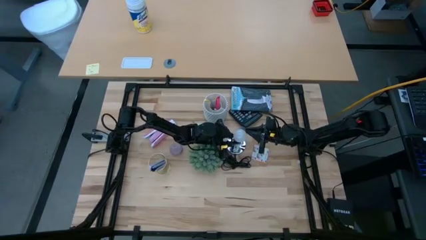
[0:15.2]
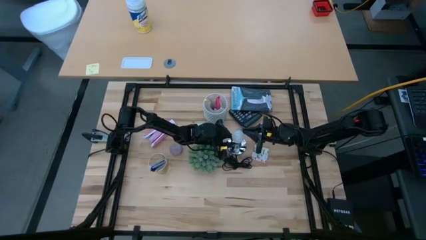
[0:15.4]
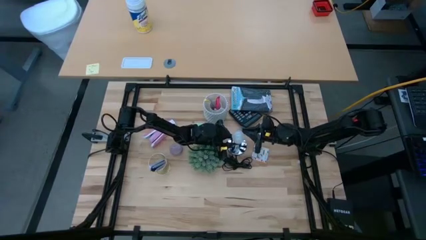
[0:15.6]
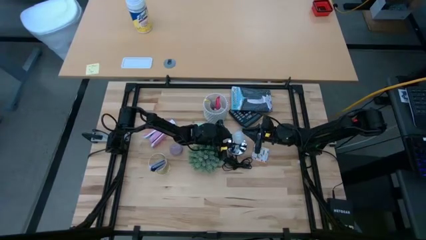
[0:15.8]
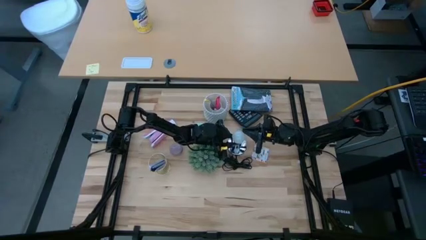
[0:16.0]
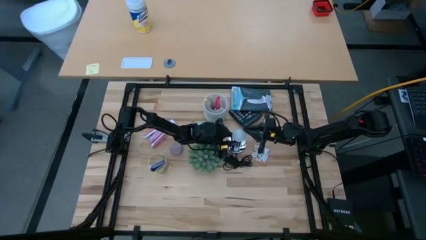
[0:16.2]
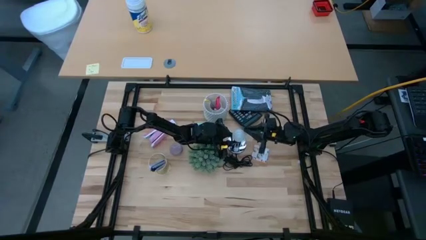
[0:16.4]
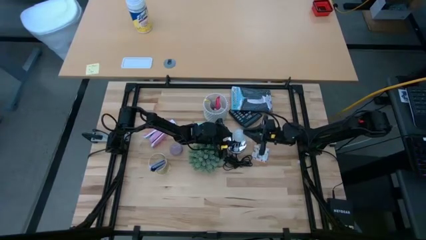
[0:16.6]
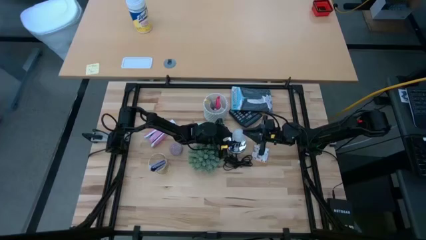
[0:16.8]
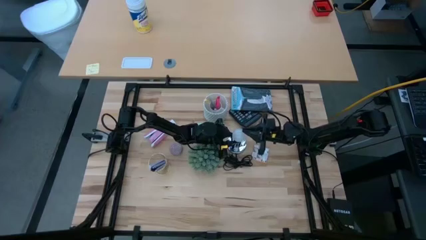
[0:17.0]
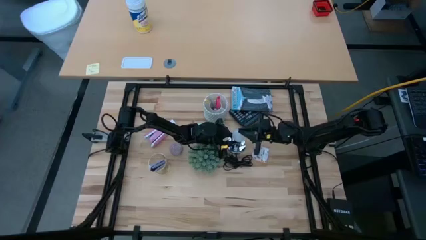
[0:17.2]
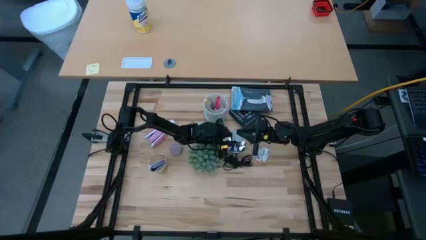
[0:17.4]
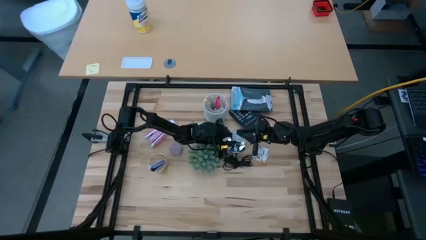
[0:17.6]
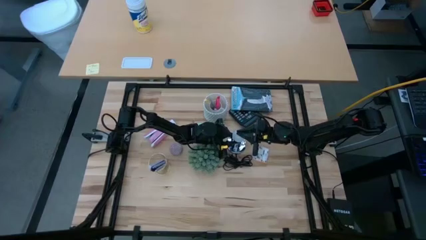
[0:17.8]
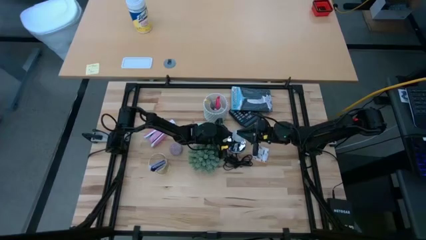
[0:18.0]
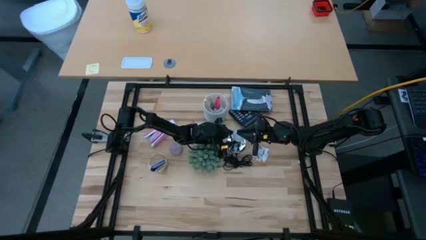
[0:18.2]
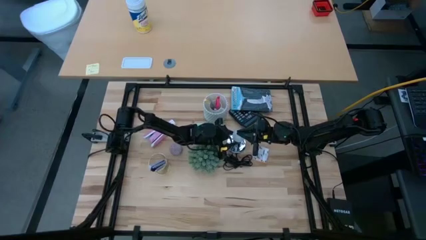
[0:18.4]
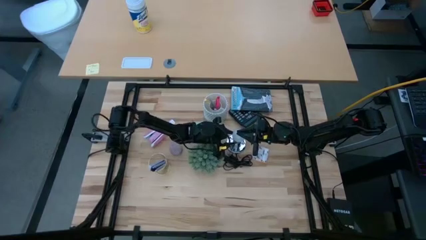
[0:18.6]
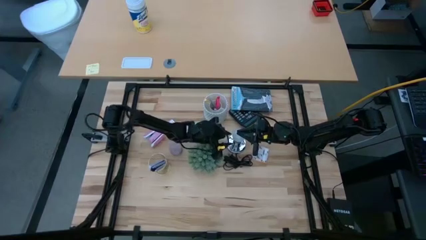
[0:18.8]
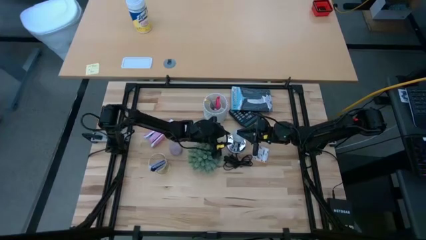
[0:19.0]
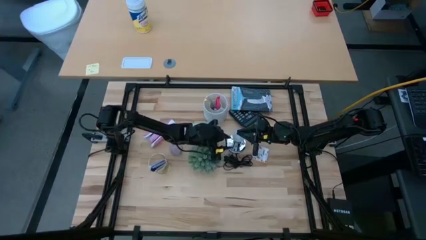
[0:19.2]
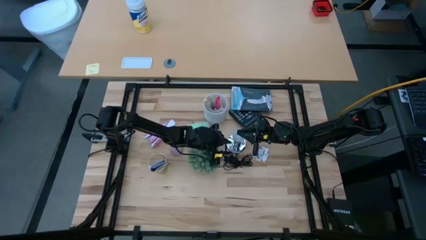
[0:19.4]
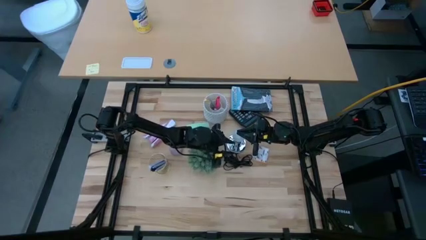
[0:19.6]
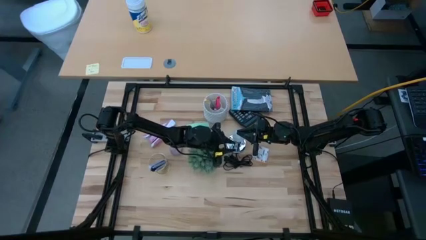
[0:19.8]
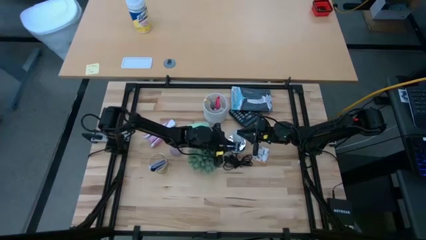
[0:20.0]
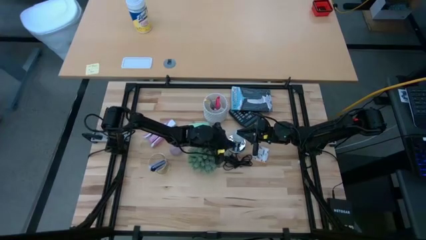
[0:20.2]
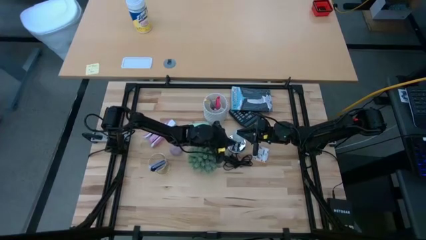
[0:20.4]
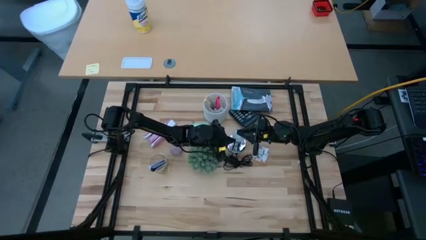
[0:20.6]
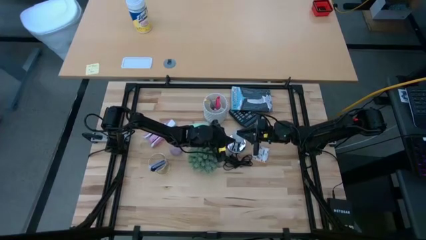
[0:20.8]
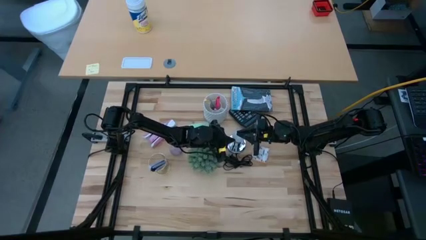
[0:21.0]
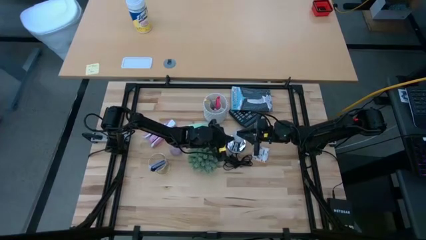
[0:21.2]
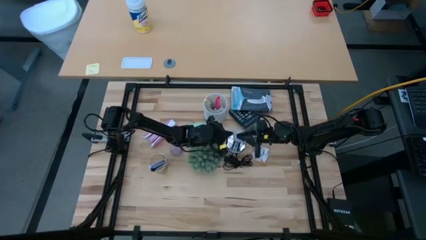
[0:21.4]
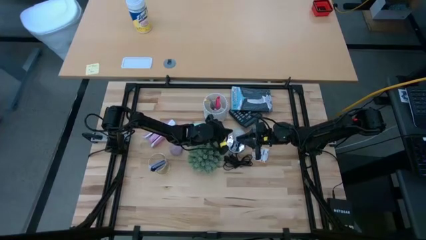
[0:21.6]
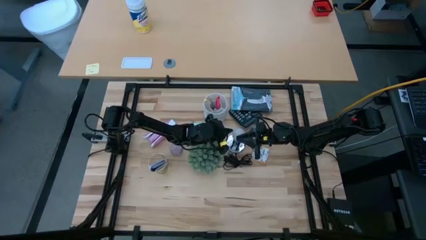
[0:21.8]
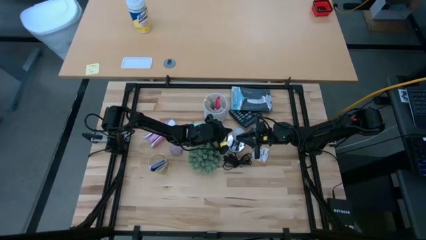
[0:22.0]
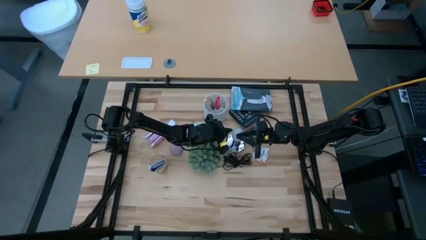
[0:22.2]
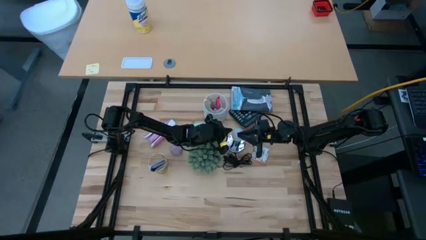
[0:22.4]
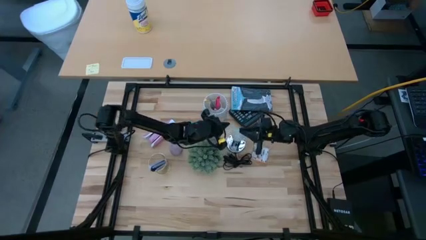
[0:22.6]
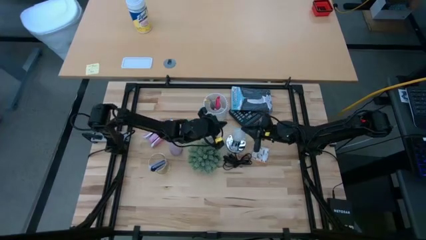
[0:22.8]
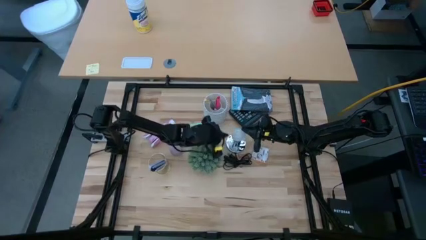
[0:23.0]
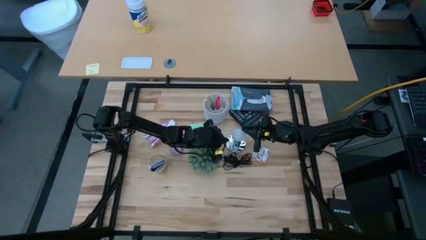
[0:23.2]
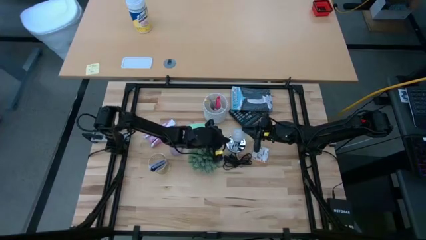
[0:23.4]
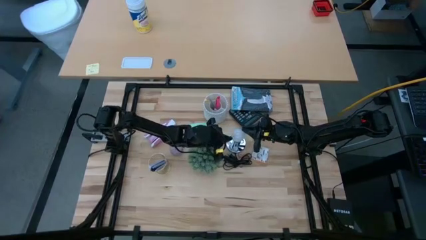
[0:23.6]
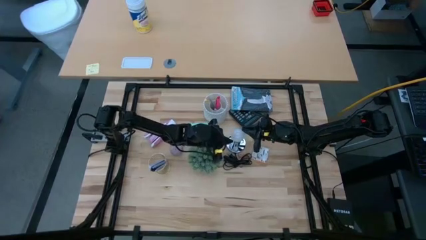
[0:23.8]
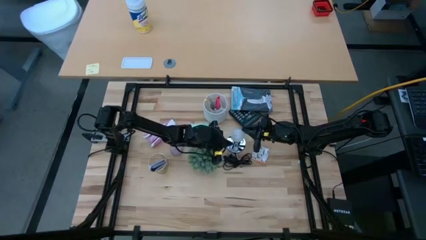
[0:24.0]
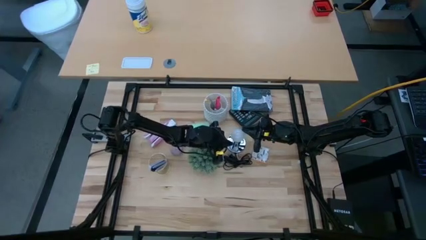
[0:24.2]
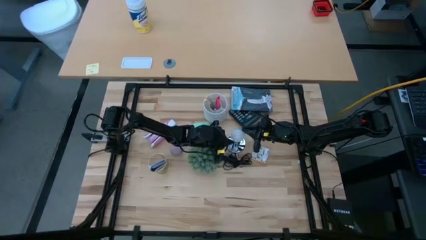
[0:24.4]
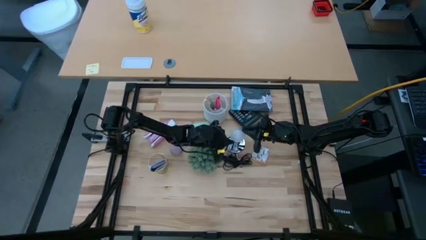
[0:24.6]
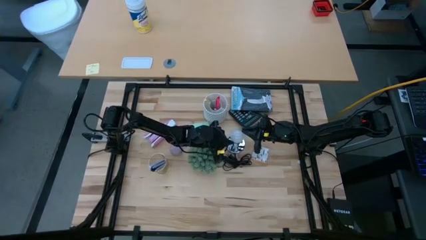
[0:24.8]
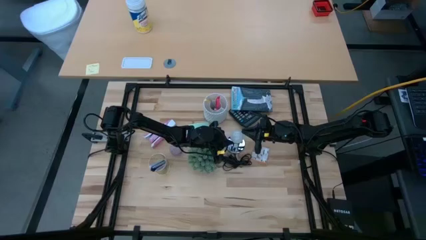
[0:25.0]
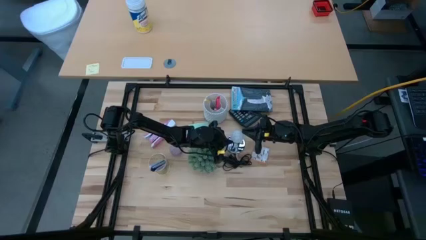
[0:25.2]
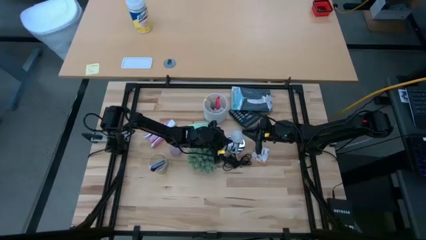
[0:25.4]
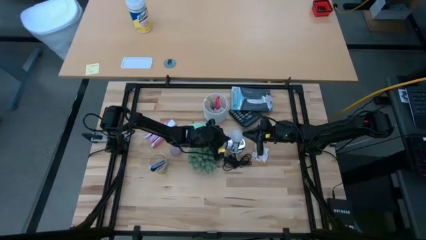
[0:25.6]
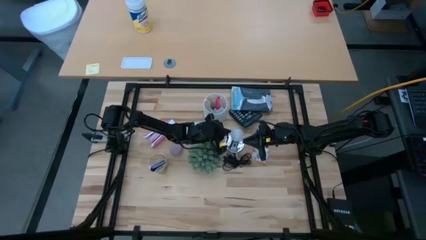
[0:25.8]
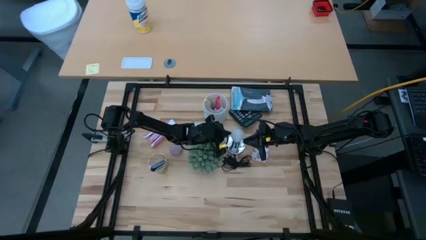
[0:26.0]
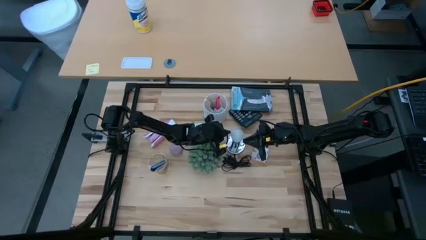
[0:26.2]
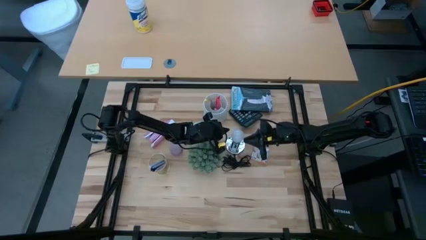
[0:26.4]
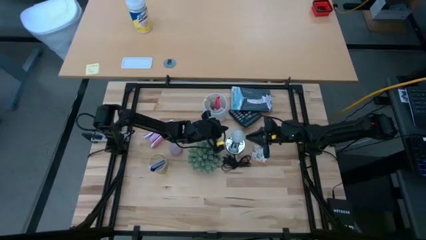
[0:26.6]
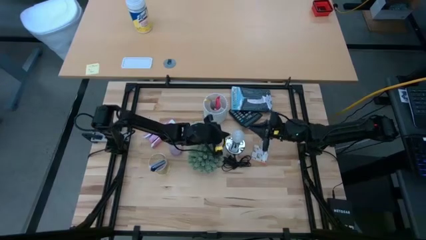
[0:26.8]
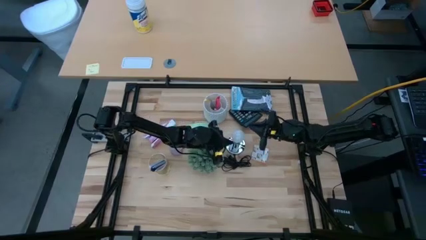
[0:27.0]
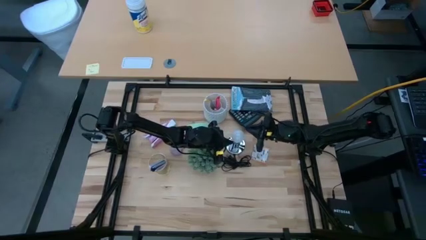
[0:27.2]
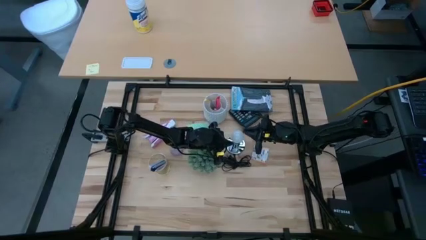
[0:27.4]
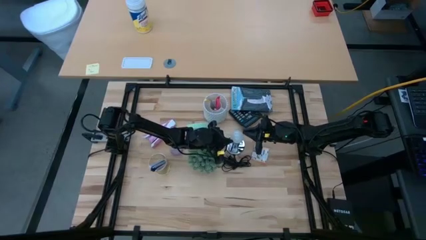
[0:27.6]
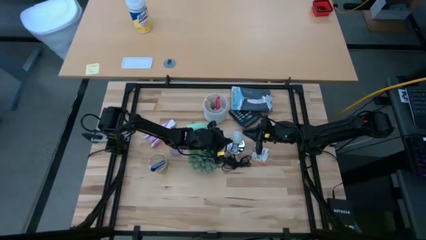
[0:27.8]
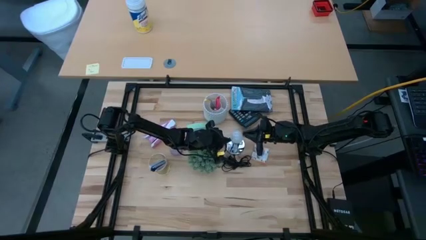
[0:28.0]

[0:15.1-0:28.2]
Task: Screw lightbulb
Insert the lightbulb into the silver desk lamp
